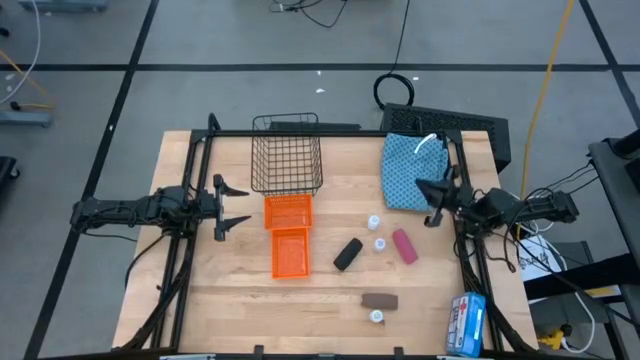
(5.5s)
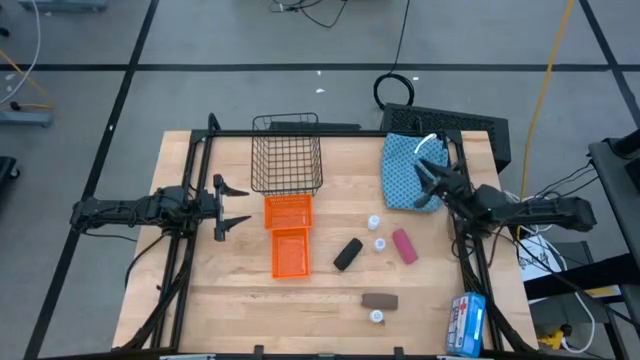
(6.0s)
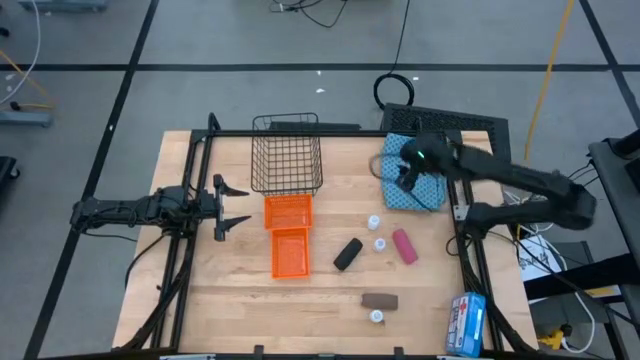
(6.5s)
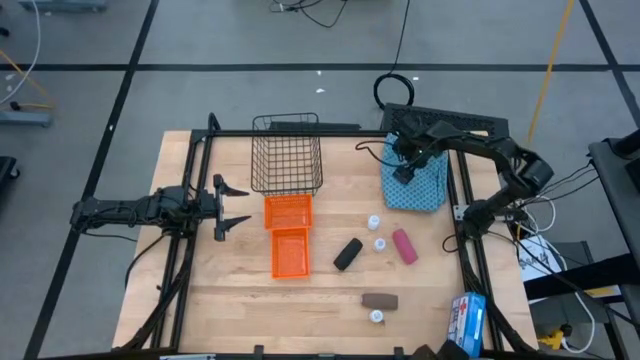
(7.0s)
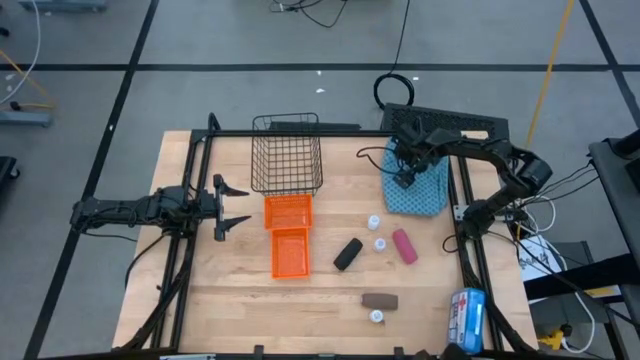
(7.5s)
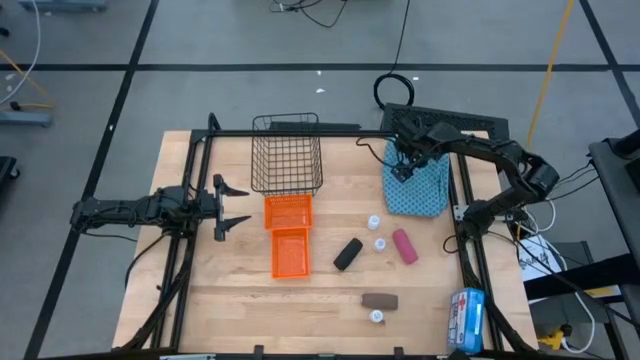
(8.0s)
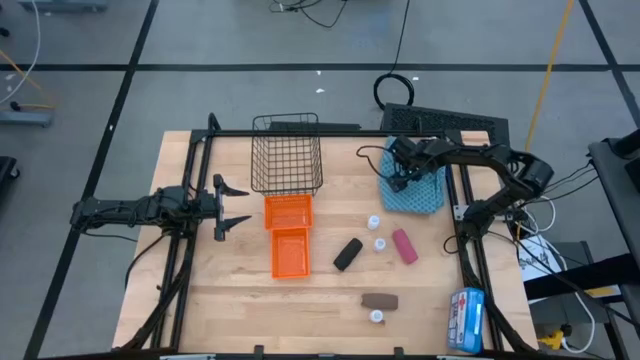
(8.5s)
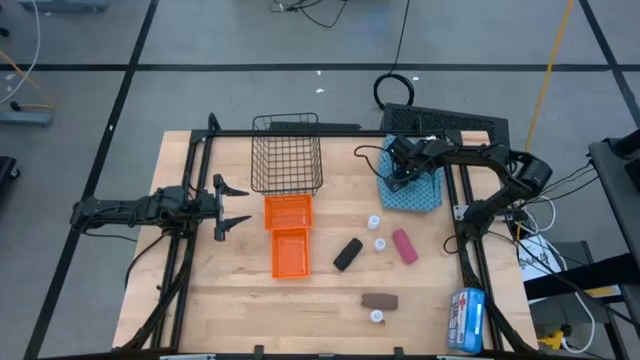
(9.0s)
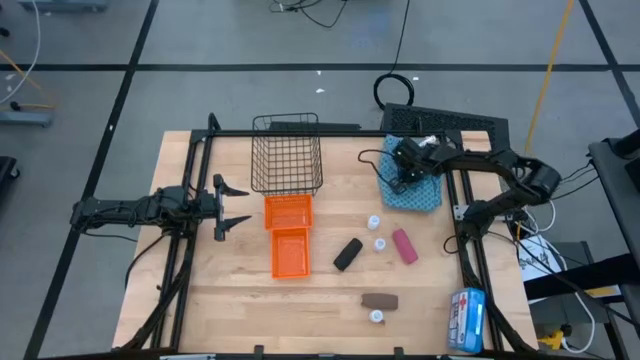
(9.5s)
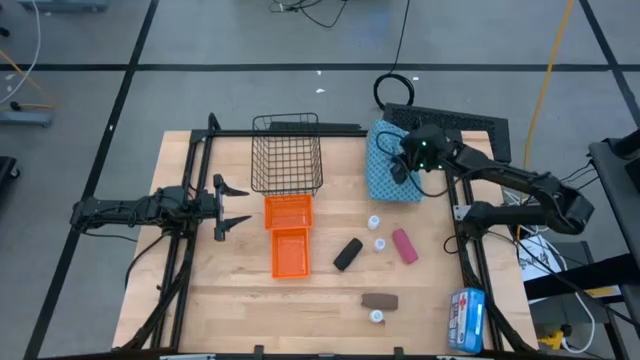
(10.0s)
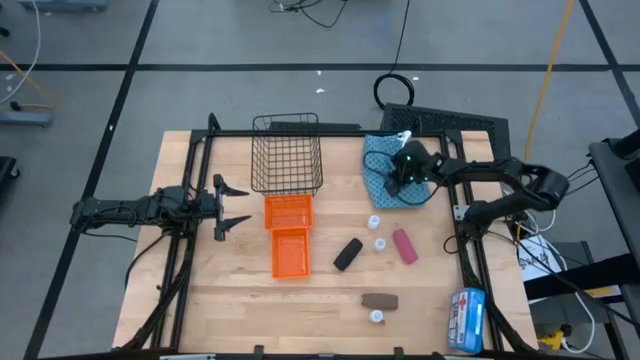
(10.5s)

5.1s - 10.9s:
Task: Pick & Place Medicine items
Put the blue patient gown into the black wire basket

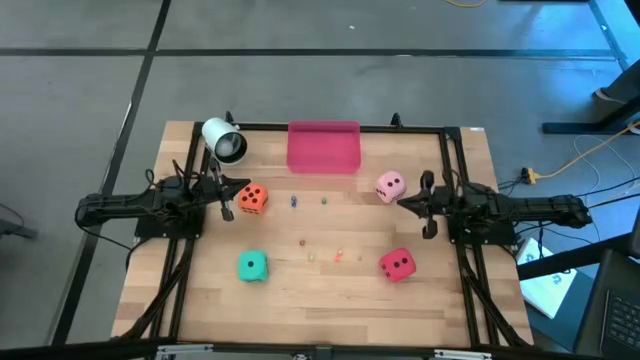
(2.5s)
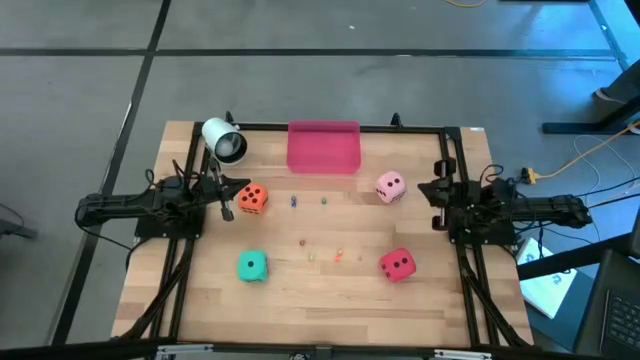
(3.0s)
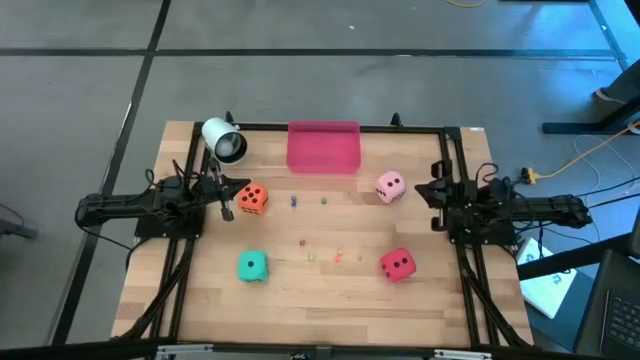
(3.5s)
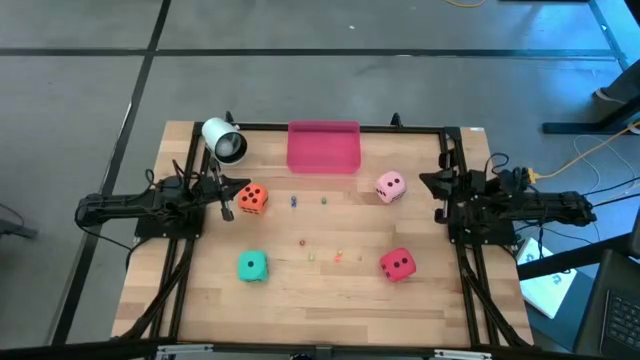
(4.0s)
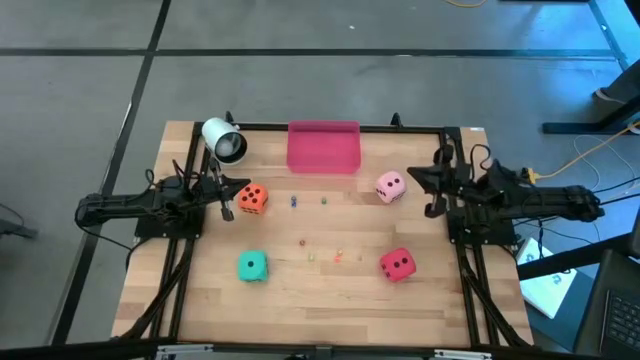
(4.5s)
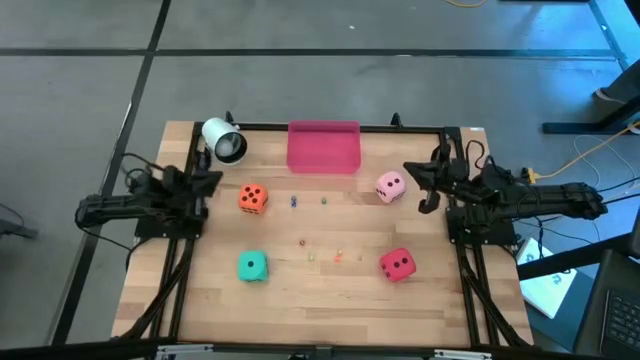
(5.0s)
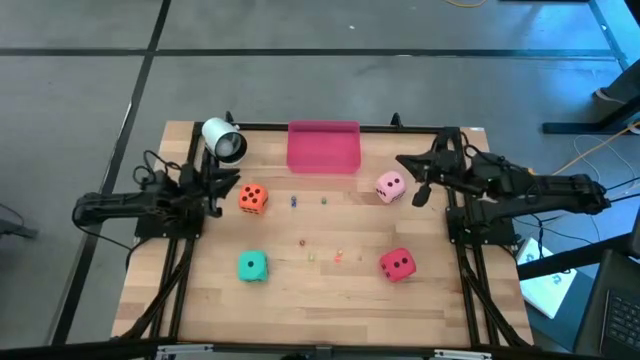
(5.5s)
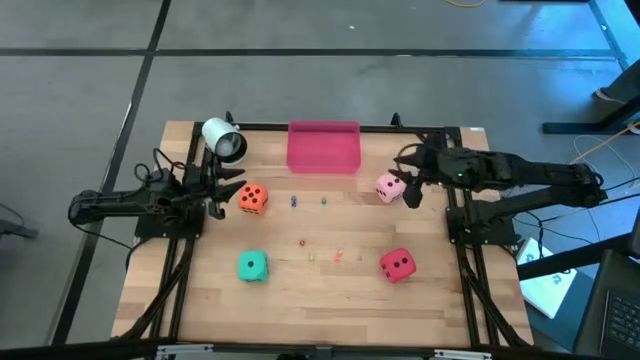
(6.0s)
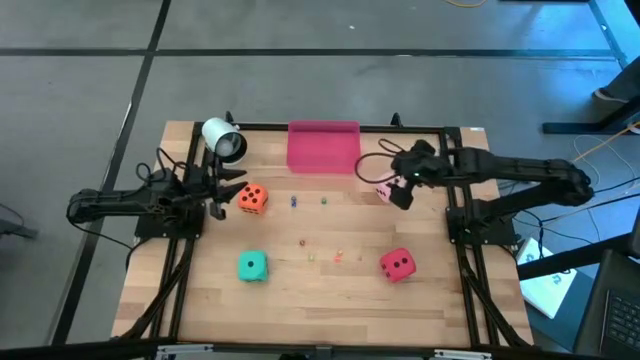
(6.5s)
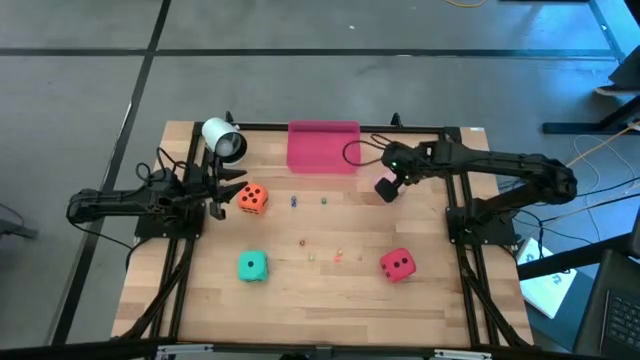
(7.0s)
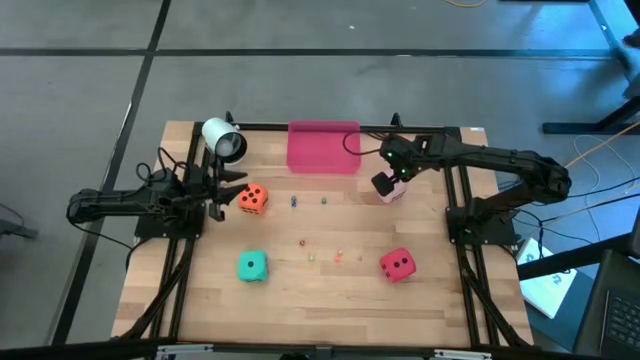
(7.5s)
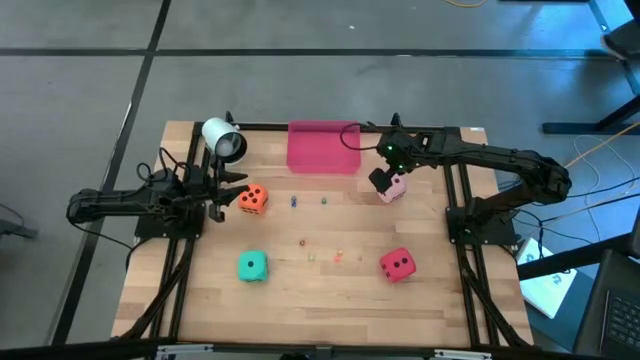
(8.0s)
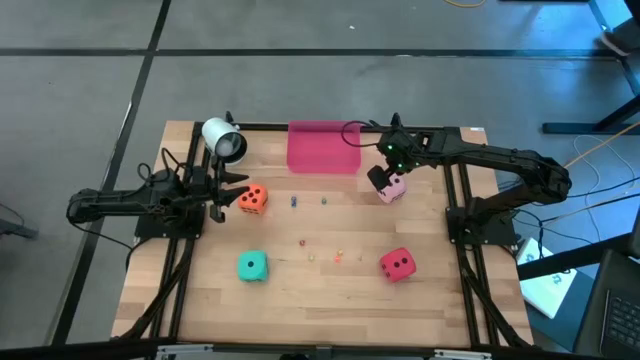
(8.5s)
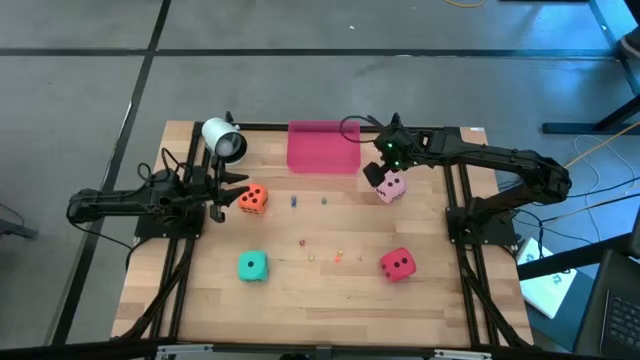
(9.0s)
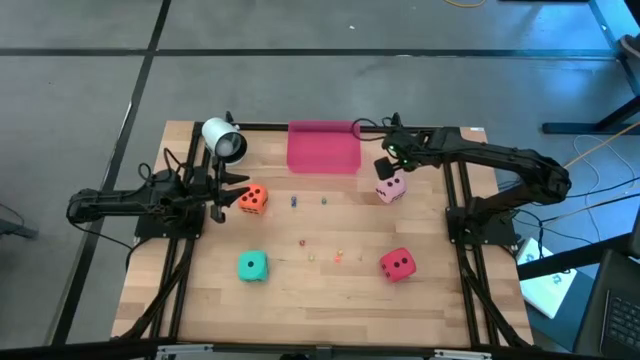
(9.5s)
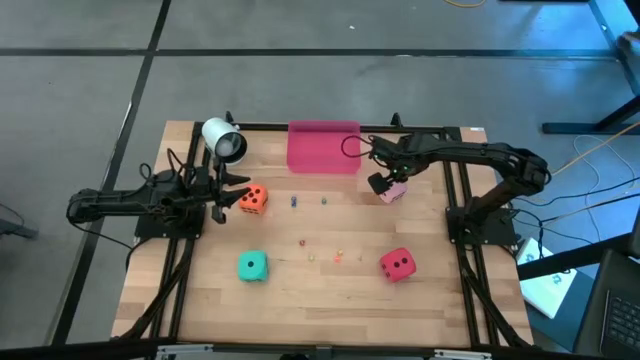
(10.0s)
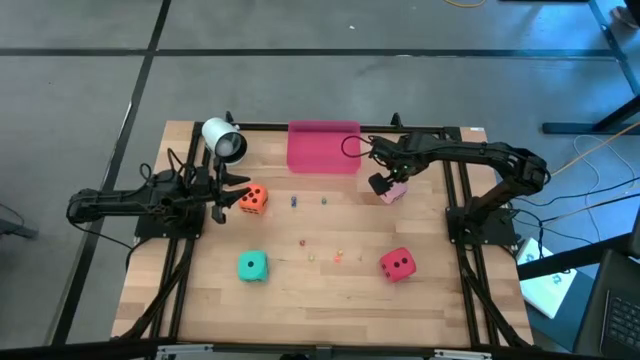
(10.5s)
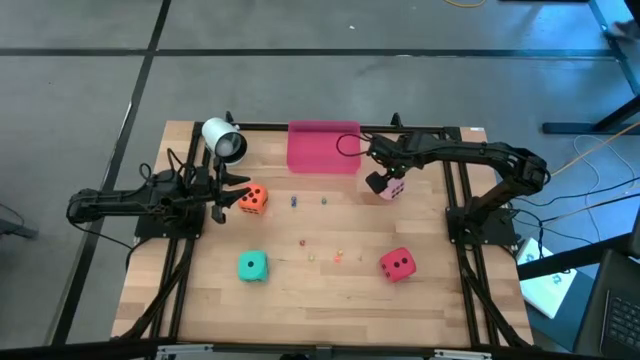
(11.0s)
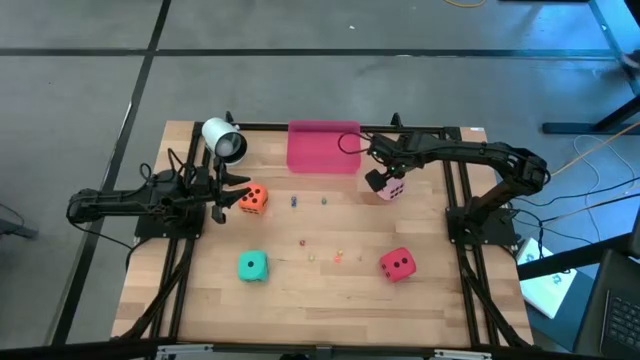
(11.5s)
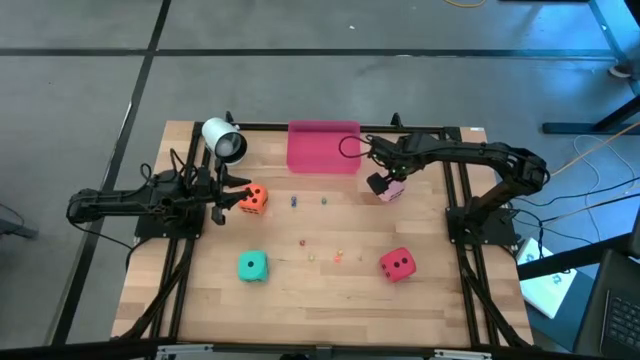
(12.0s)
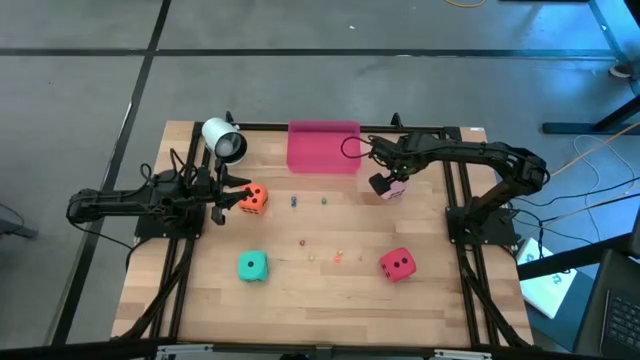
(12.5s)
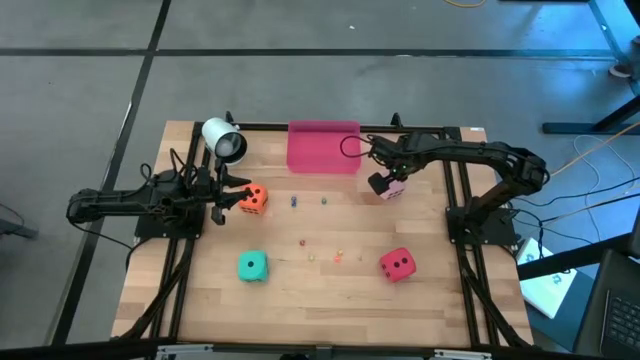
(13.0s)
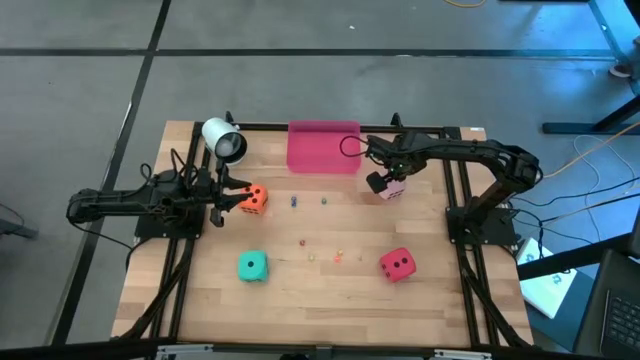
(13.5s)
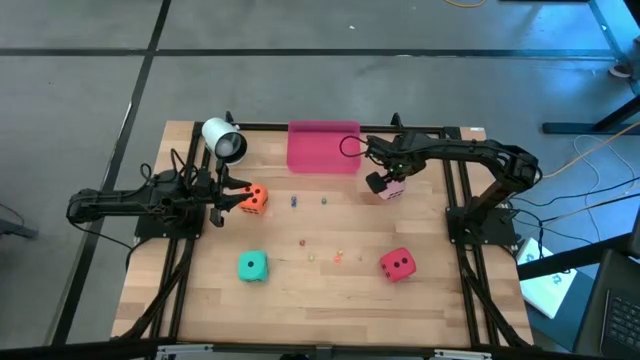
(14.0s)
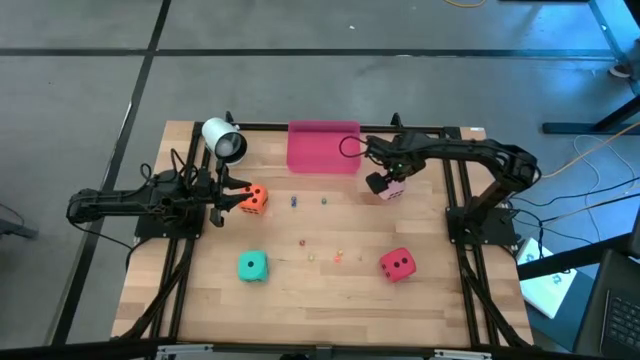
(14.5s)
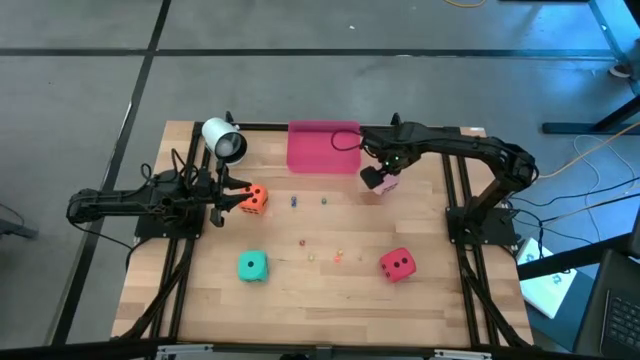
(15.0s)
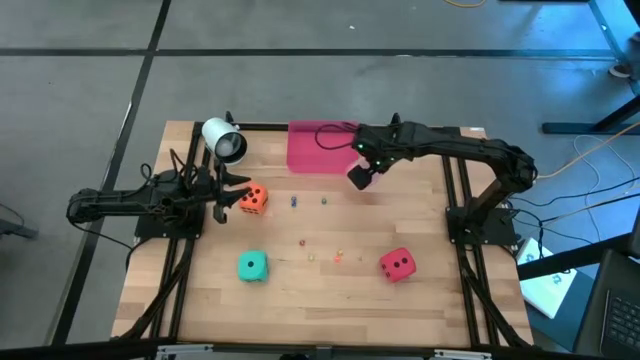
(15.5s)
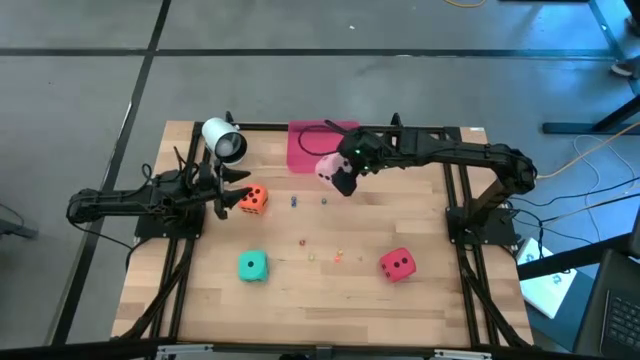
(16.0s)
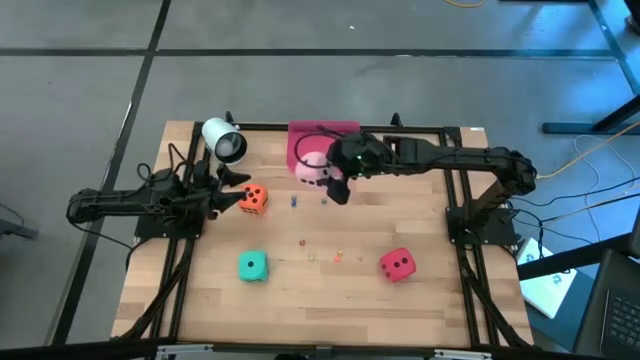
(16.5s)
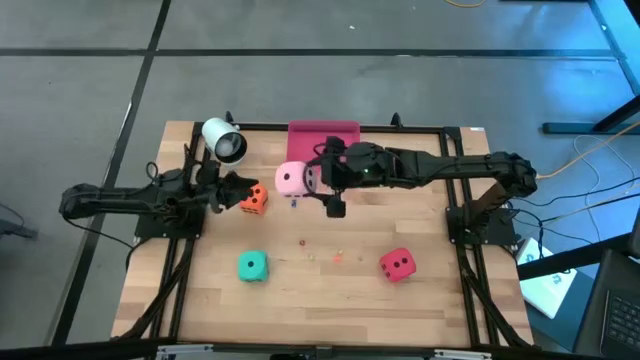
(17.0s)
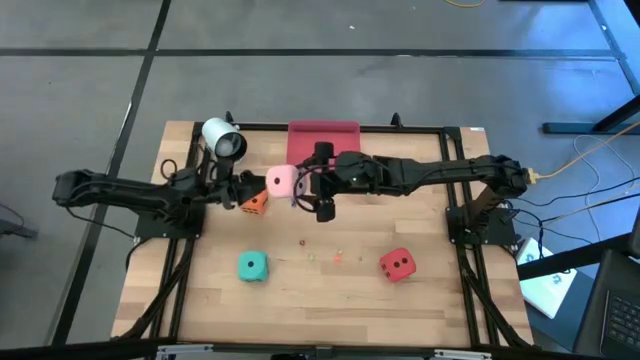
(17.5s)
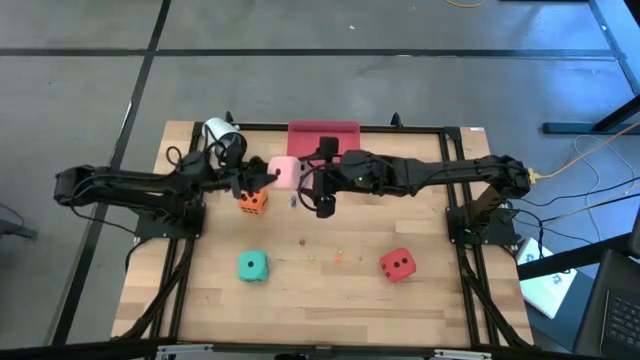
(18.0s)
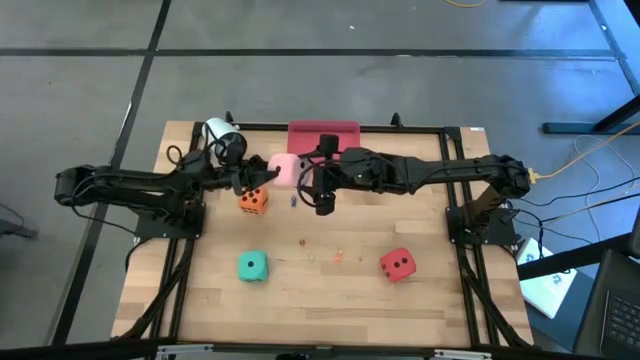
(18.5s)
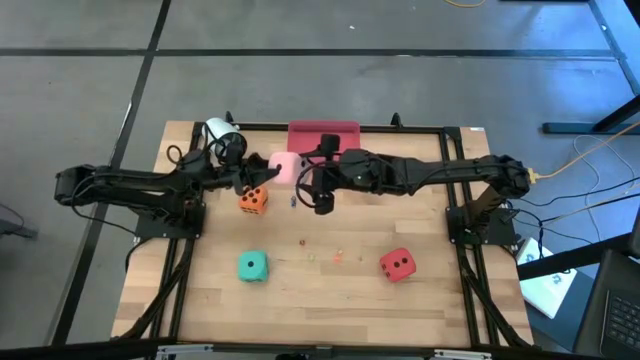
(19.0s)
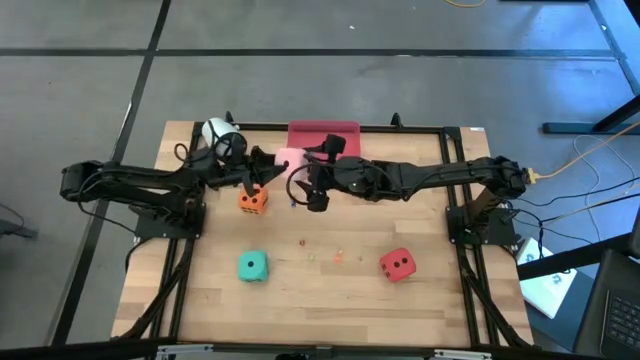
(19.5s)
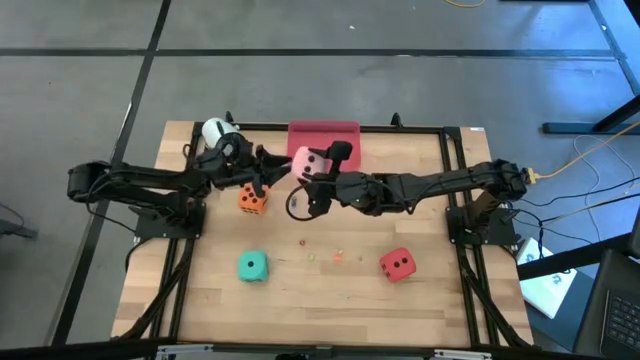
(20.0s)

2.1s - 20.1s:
Task: Pick & Place Dice
Put the big pink dice into the pink bin
